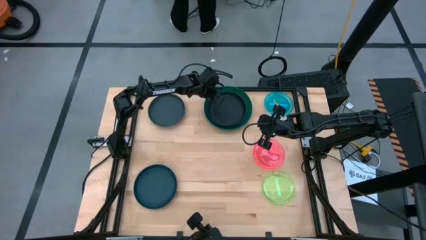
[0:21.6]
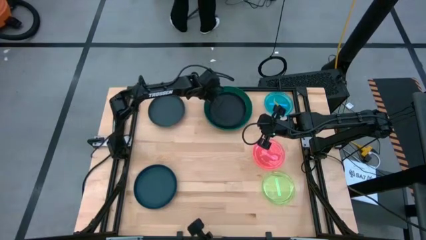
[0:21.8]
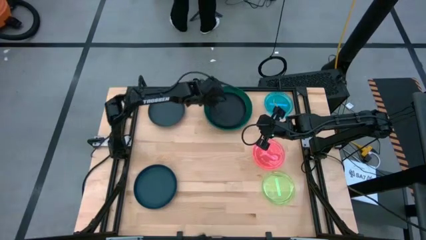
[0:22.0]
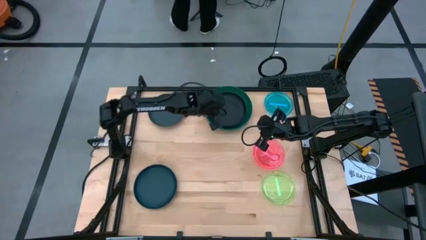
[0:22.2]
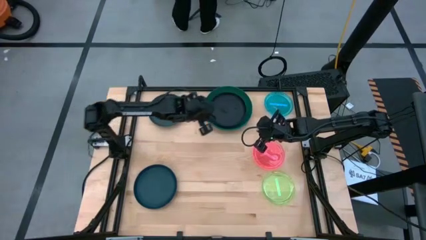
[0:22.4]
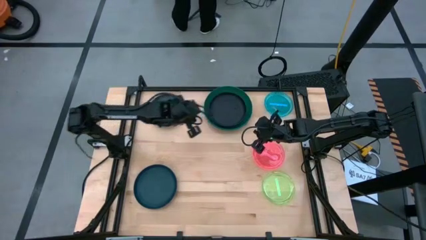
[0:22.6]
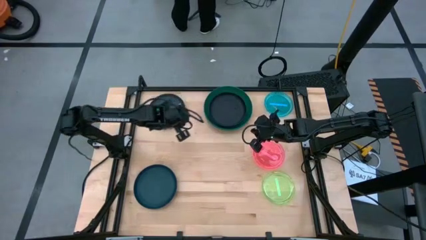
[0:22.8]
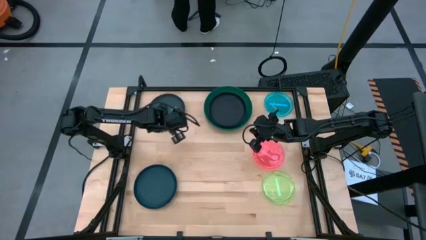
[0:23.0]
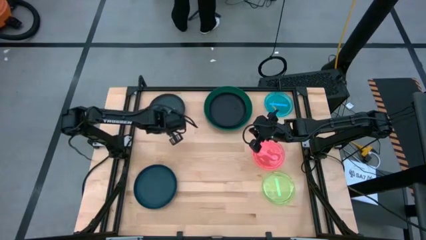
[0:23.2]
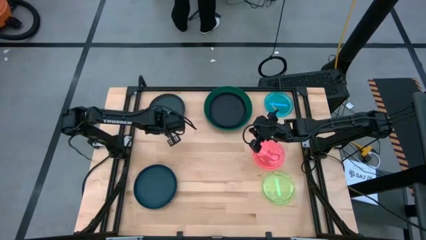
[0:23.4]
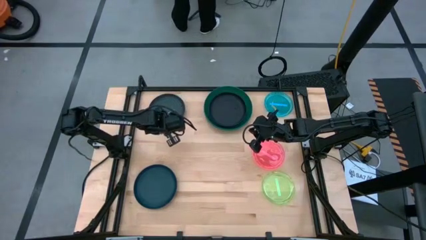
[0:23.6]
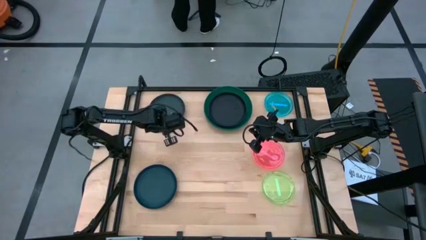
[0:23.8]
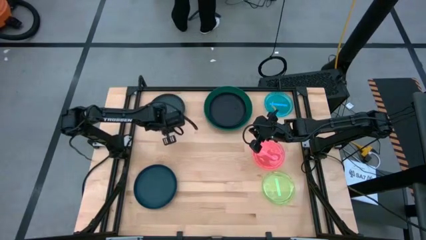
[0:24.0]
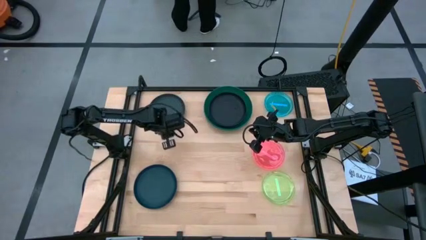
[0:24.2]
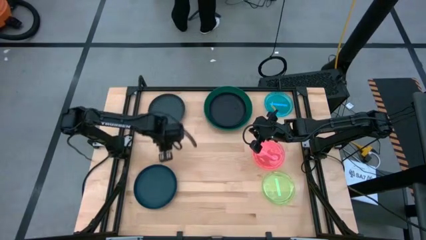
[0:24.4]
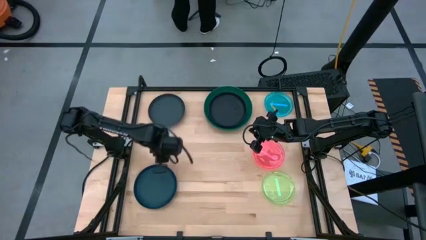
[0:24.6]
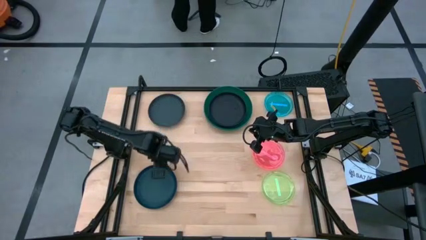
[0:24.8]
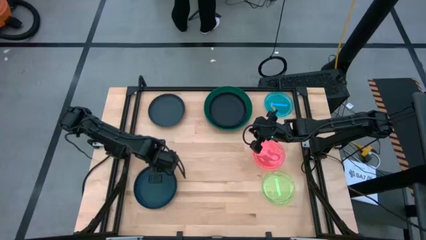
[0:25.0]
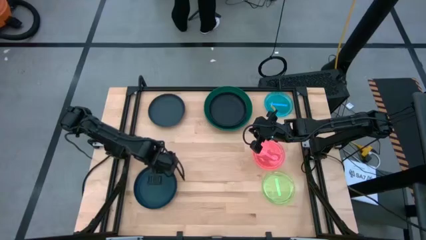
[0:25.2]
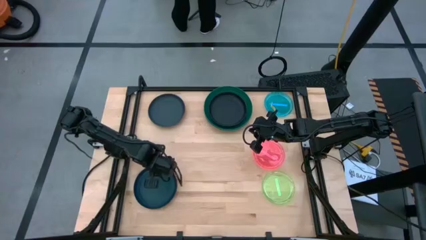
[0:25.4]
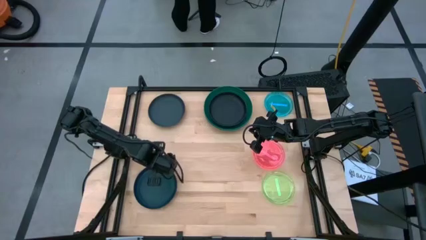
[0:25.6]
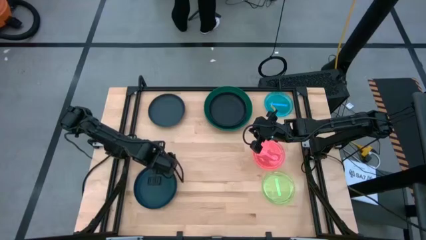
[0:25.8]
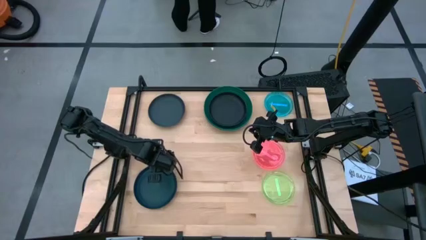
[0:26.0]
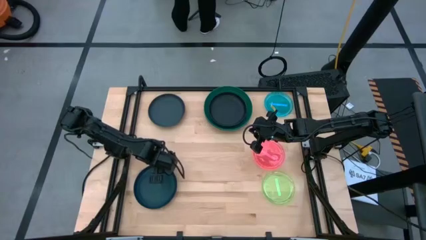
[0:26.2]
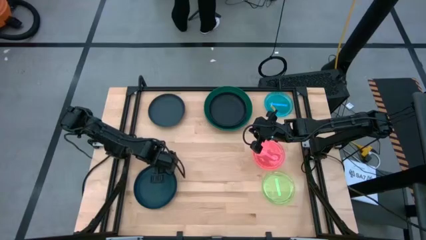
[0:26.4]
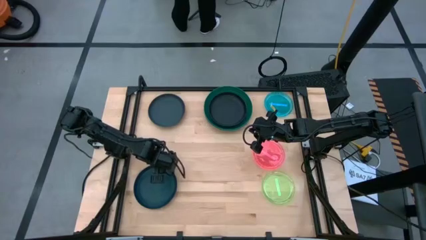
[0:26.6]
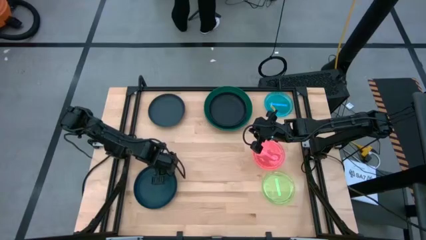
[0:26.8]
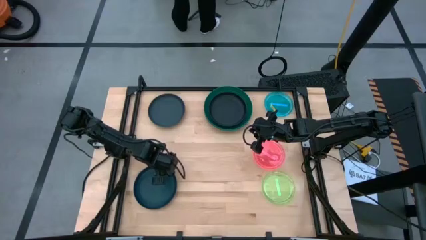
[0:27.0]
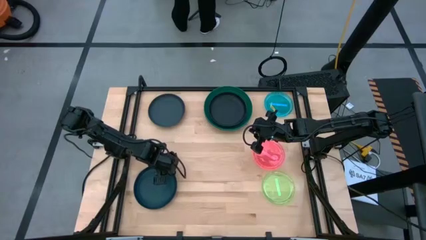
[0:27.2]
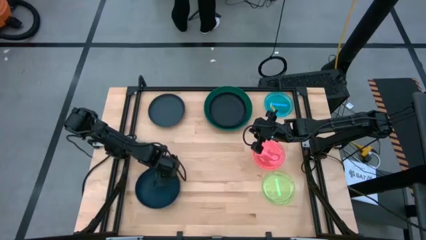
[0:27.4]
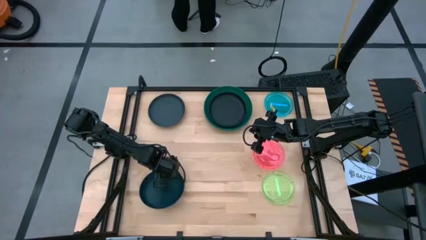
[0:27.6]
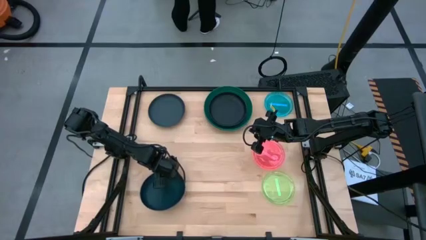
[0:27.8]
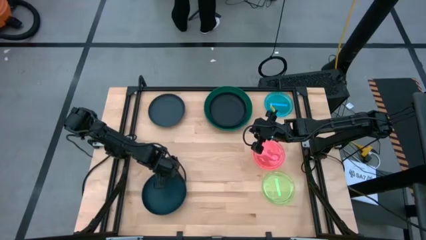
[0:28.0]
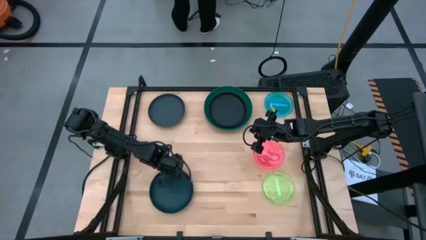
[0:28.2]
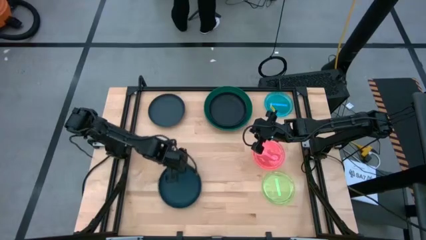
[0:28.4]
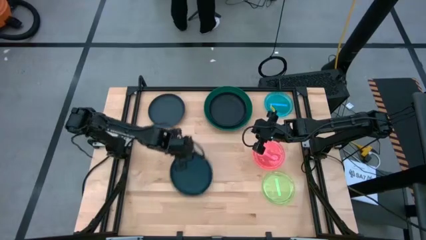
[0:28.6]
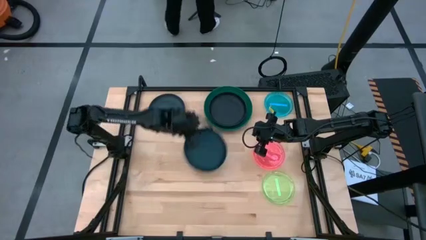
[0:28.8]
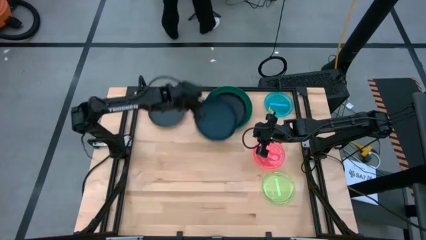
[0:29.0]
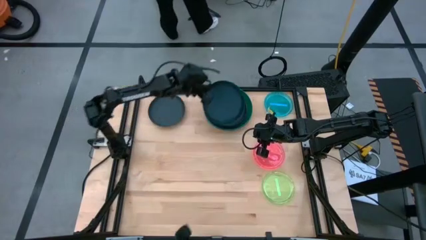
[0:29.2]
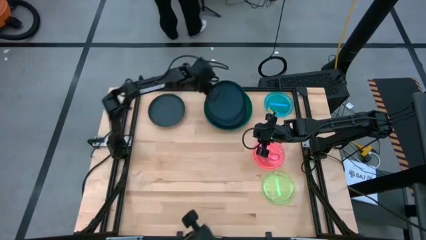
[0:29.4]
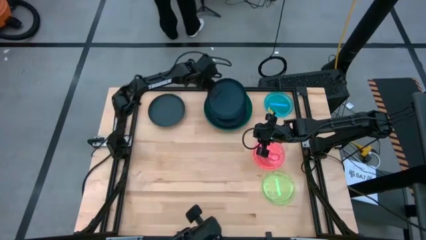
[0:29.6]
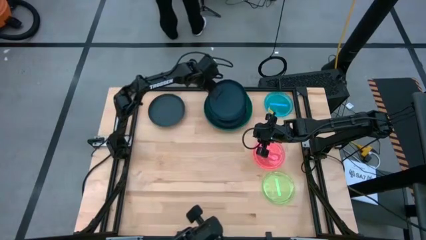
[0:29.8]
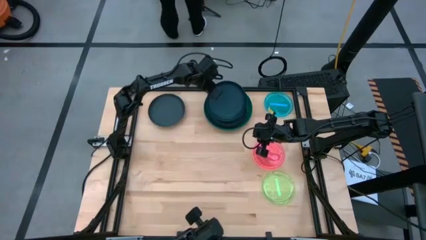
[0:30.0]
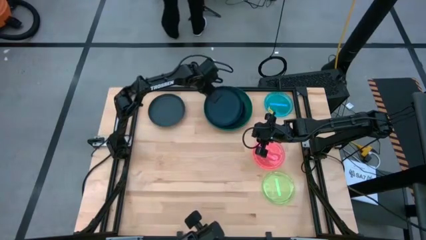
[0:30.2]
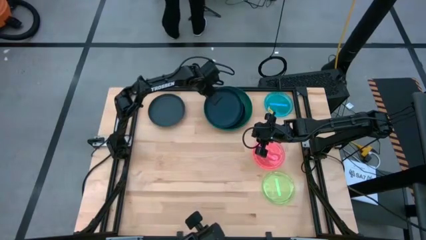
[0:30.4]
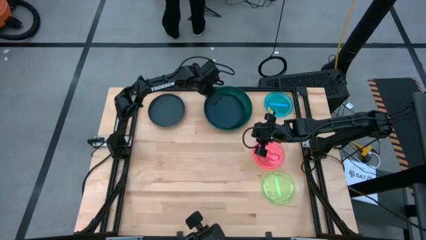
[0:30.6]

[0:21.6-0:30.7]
Task: Stack plastic plates
Stack the bottom dark blue plate on top of the black plate

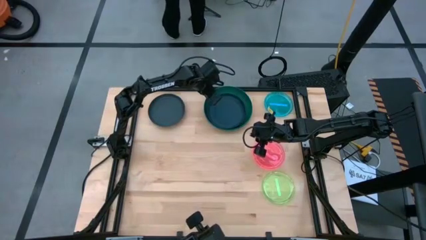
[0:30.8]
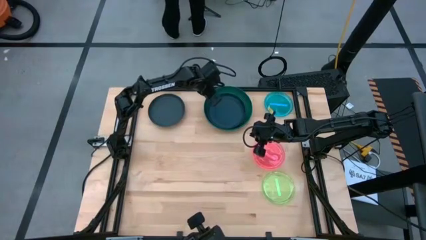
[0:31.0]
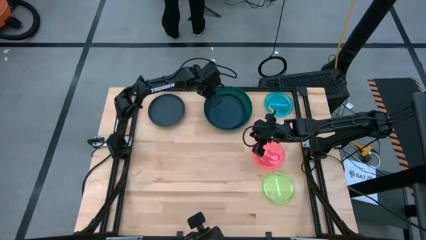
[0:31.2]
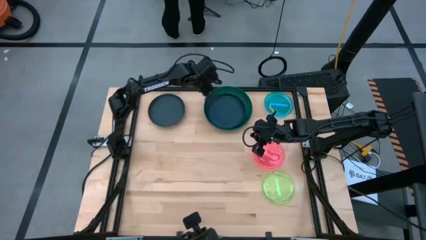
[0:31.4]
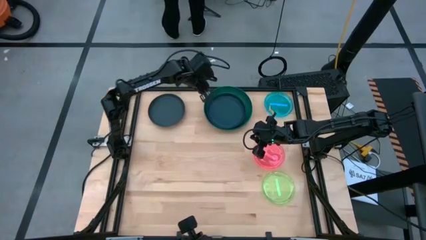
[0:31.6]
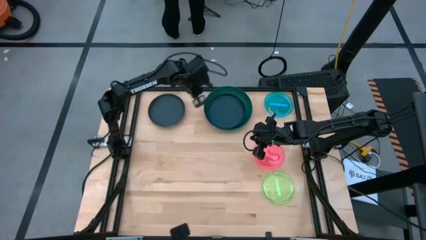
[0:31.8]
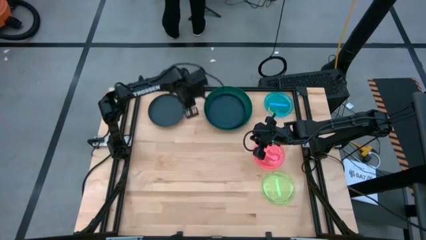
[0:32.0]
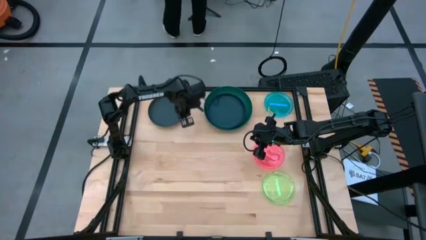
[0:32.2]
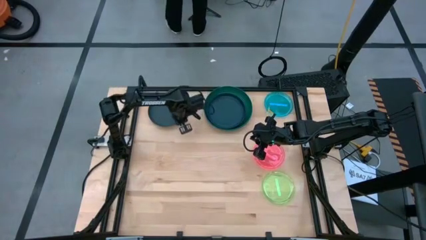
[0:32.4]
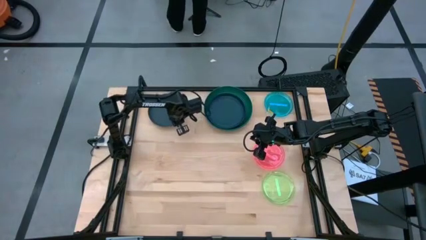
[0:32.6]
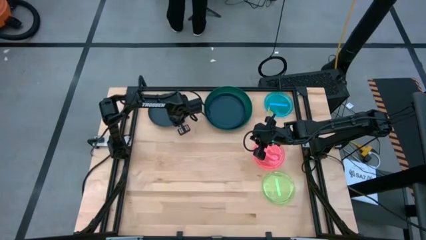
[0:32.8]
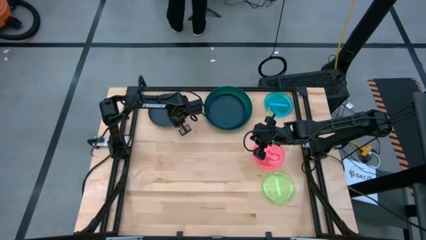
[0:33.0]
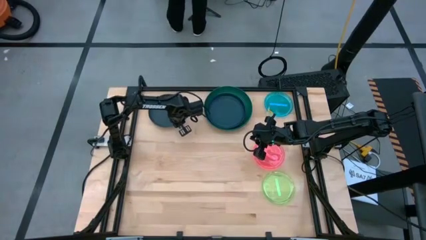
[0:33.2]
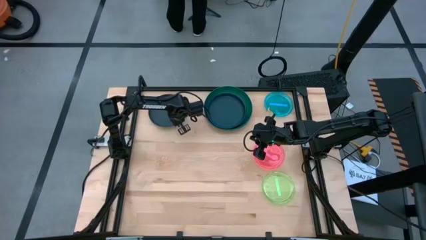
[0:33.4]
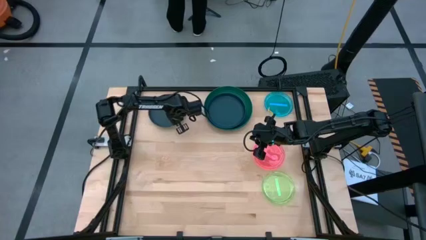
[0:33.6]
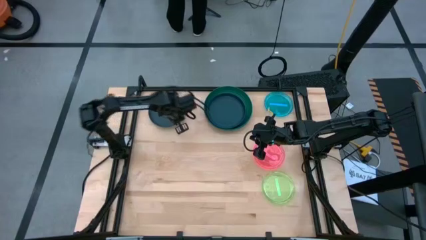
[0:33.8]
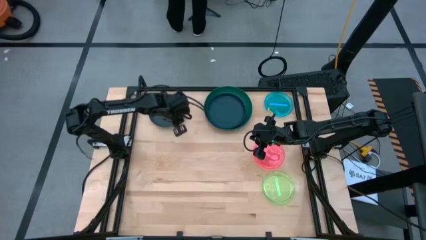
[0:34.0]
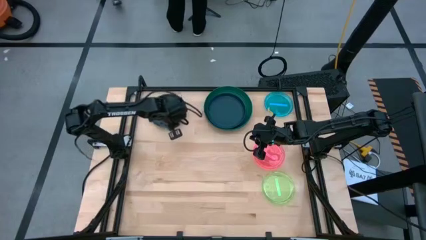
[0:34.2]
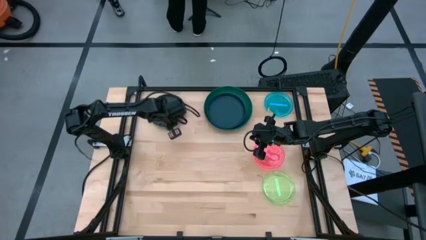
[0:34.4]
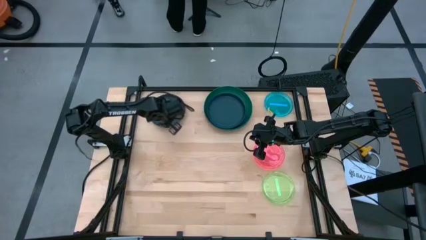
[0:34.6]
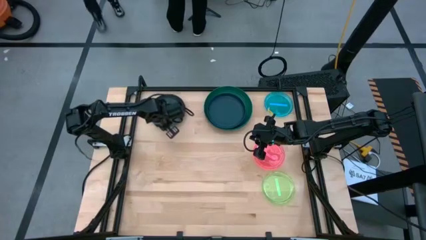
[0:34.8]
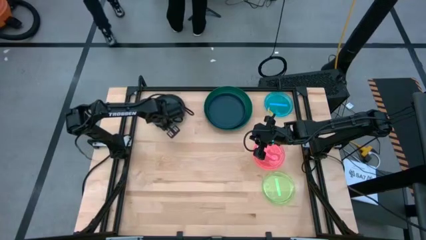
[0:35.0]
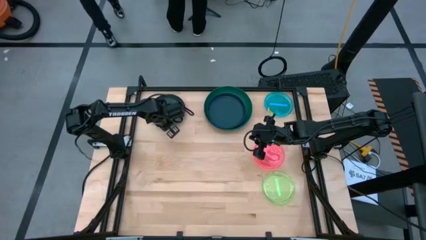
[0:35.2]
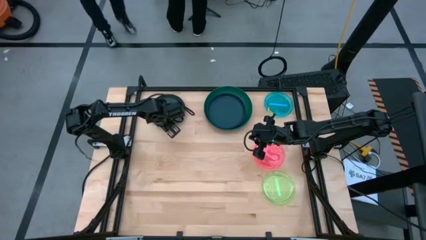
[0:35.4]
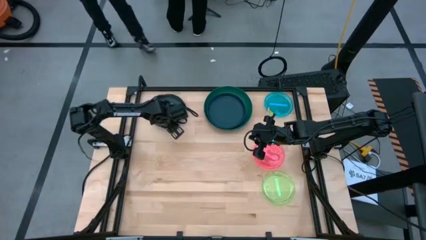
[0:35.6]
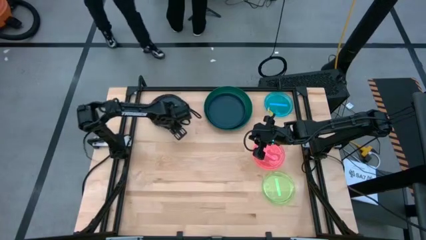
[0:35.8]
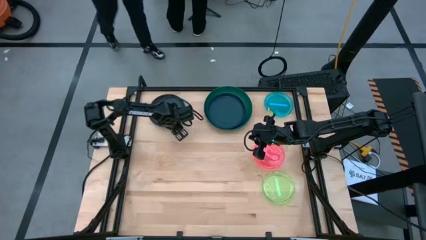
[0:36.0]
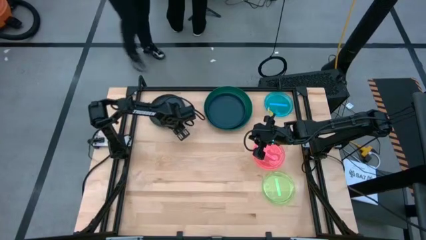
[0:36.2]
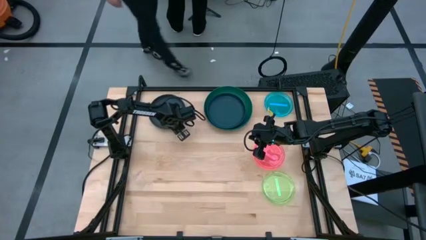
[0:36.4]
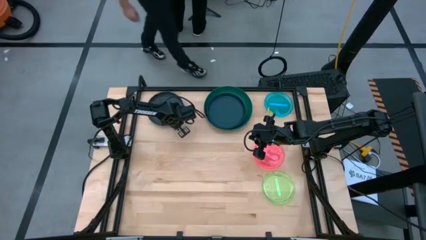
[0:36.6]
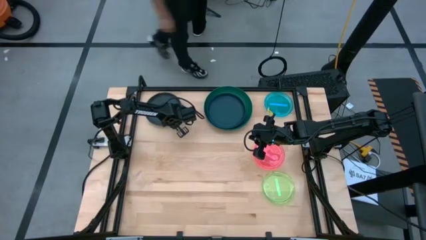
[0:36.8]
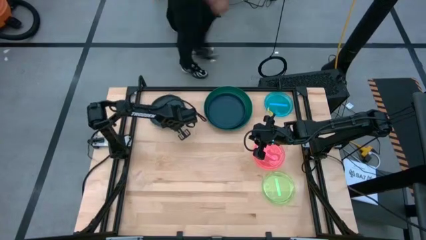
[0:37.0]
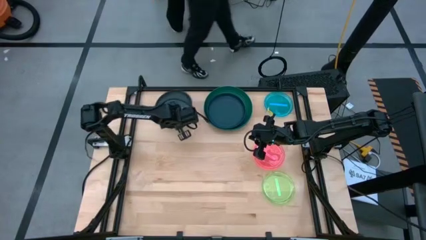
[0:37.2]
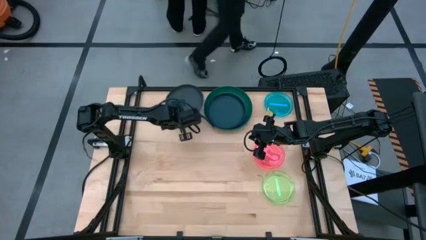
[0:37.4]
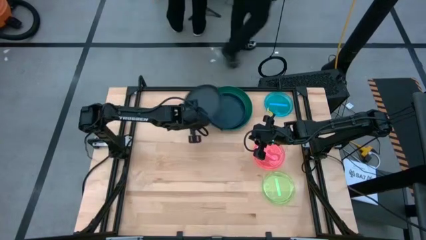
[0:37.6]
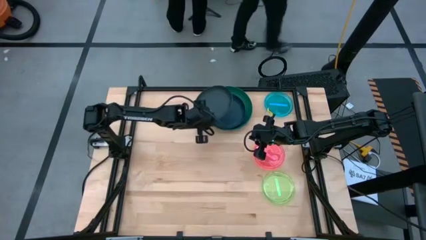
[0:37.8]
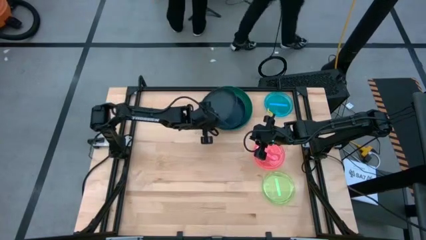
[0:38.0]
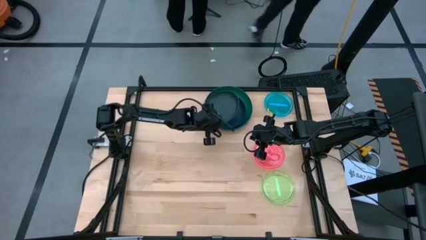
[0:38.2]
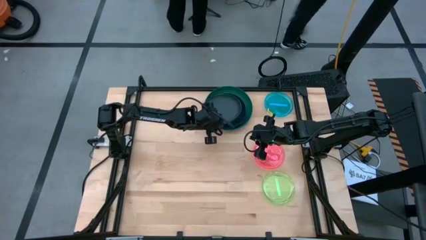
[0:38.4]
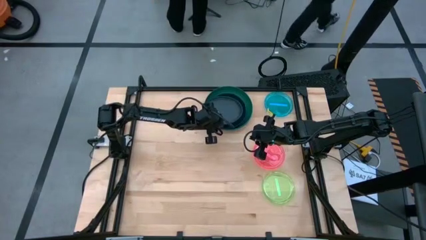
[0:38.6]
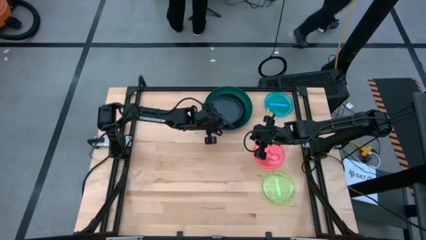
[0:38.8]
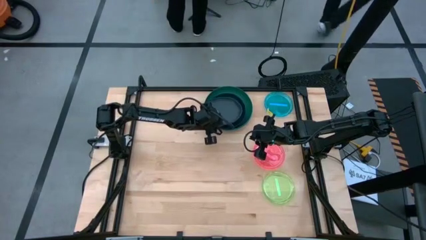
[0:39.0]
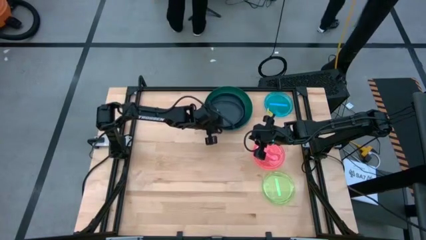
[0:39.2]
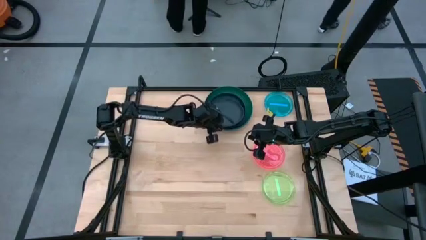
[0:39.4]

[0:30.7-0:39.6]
Stack the dark blue plate on top of the dark blue plate
